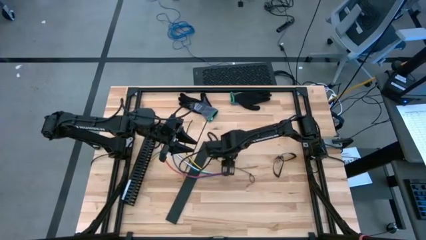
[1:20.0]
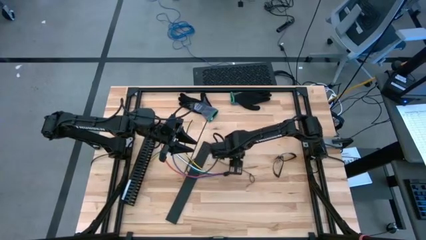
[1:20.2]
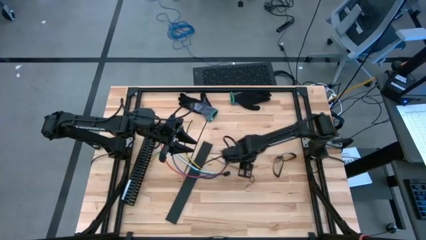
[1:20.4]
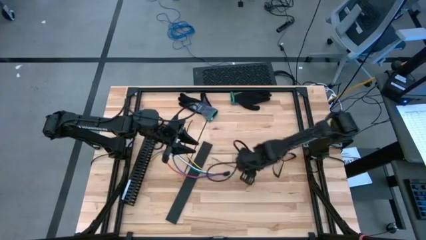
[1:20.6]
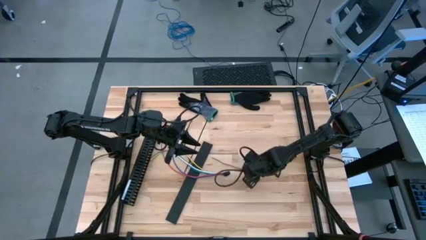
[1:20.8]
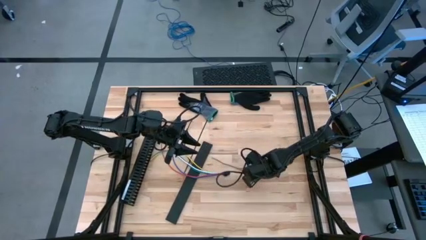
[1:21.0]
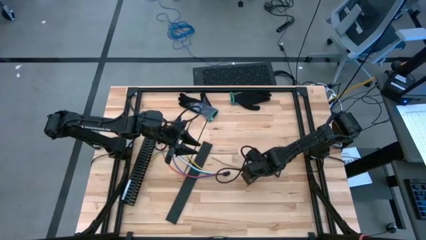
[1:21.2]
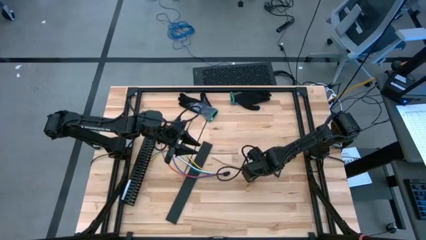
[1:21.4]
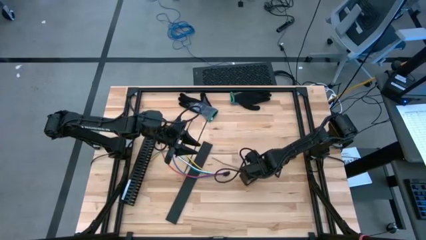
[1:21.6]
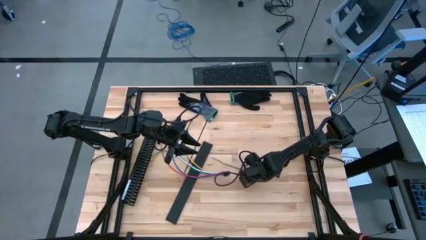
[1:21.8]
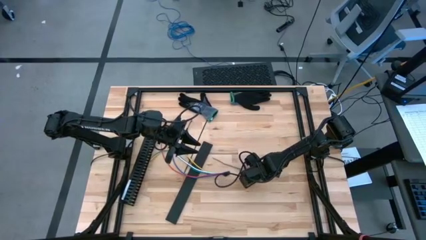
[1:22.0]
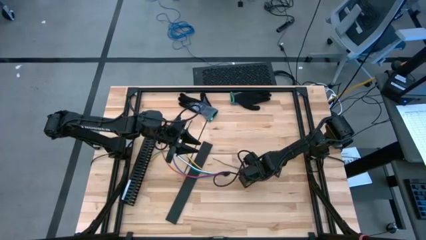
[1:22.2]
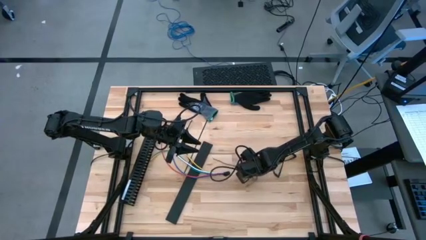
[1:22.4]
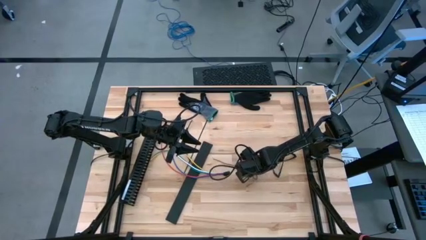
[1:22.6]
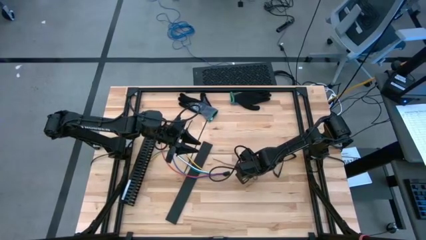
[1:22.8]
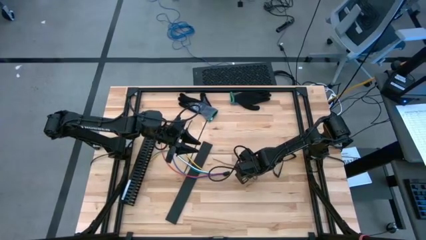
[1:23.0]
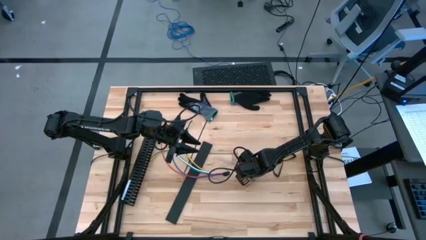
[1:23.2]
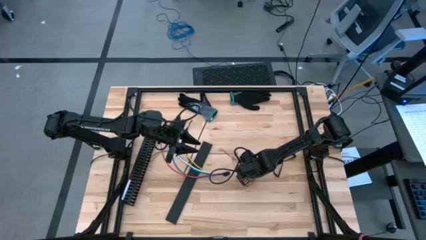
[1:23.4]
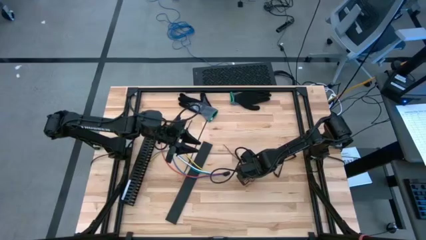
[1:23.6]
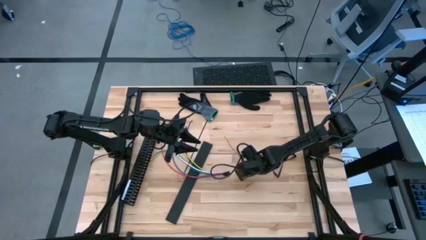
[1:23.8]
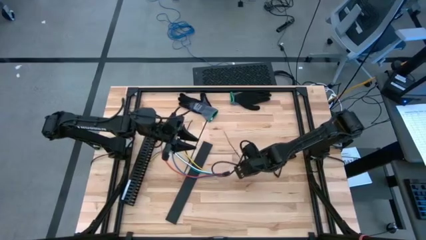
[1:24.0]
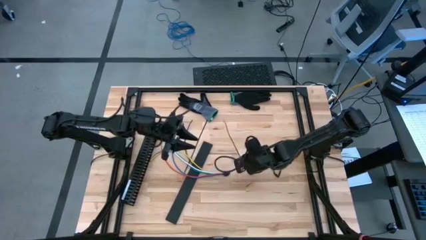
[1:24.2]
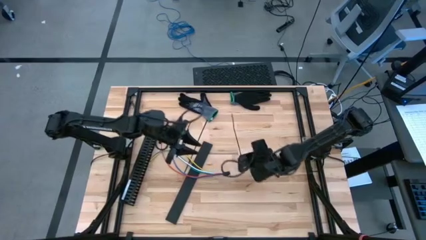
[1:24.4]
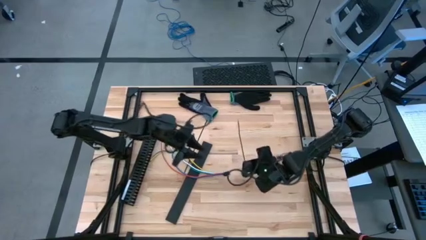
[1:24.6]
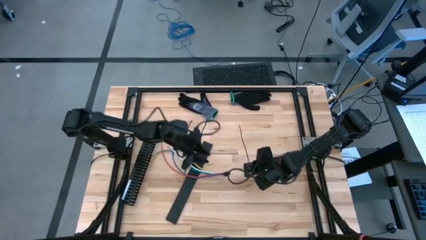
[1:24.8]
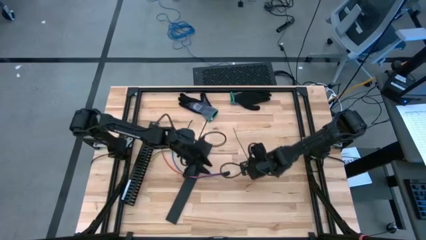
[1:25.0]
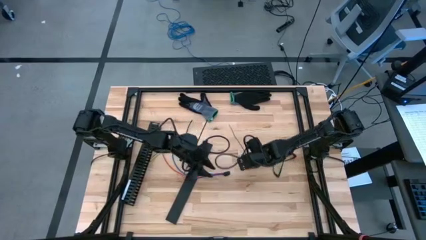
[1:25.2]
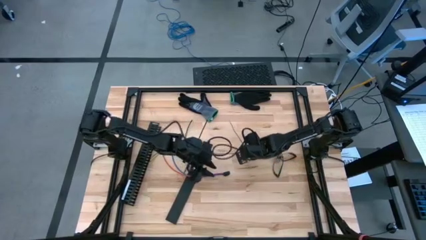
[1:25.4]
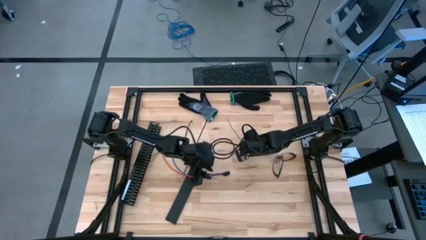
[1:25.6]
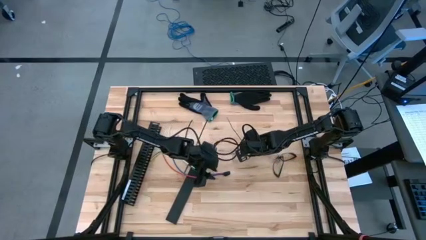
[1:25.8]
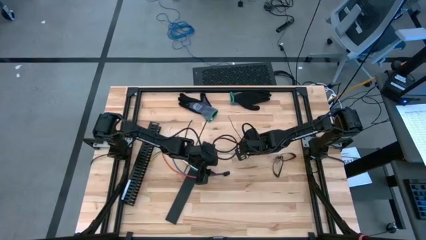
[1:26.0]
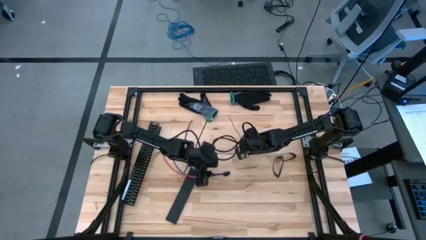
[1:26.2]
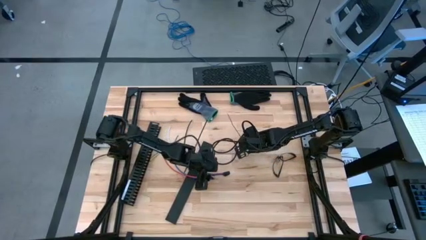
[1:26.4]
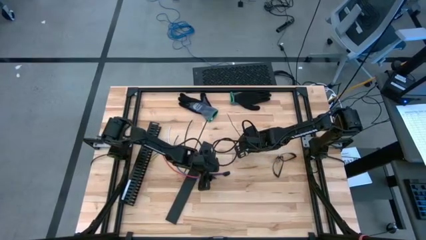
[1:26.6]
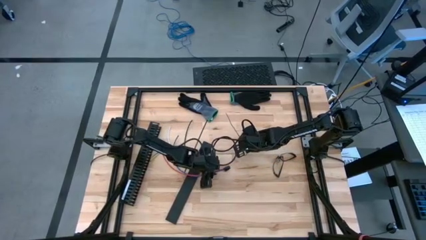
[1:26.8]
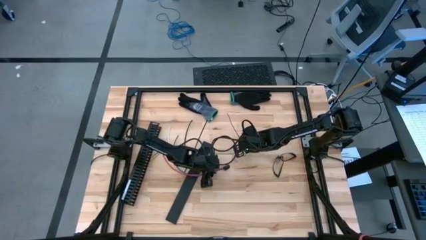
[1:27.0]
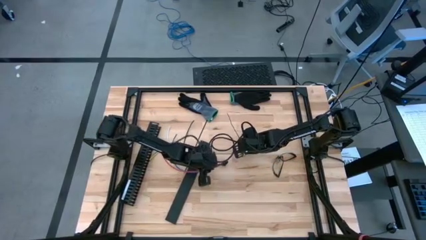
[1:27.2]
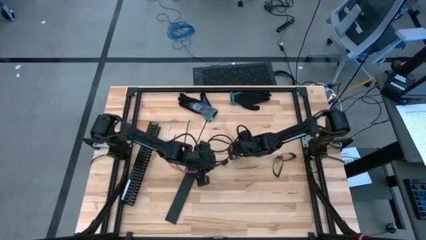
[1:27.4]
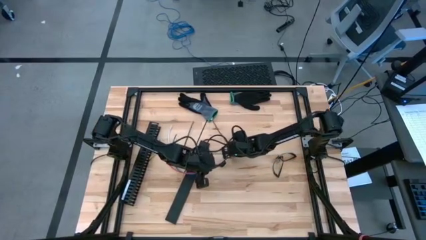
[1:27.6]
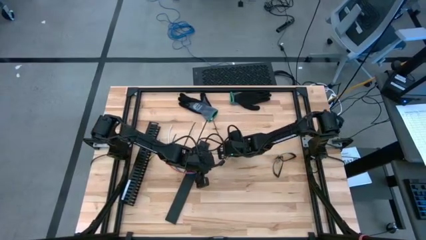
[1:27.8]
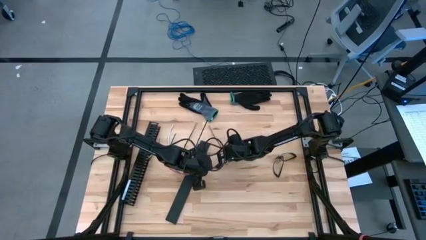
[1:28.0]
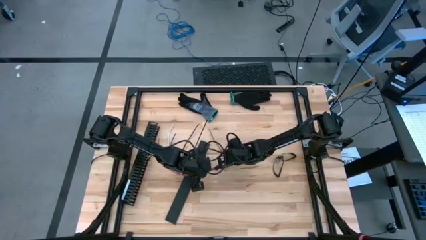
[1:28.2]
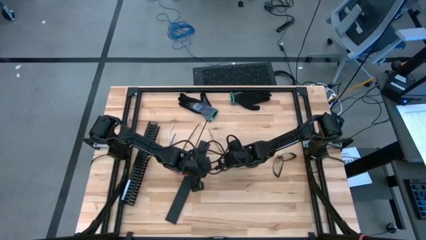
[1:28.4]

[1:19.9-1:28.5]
Task: Ziptie cables
Adjust the black zip tie

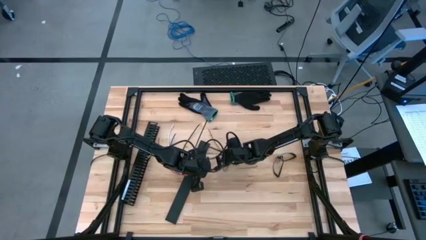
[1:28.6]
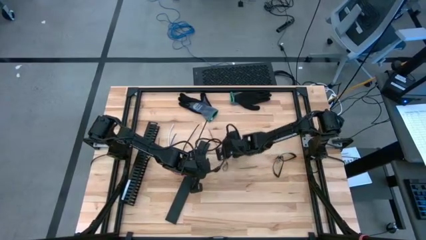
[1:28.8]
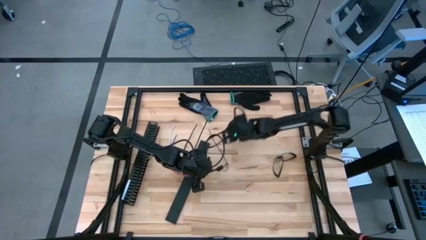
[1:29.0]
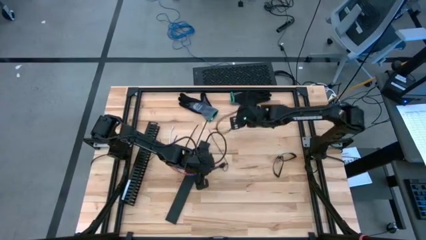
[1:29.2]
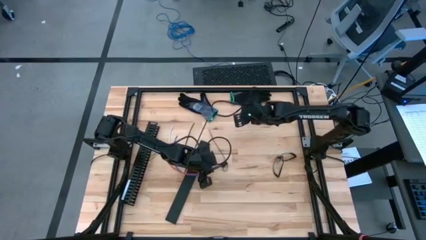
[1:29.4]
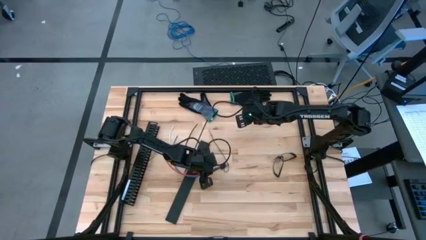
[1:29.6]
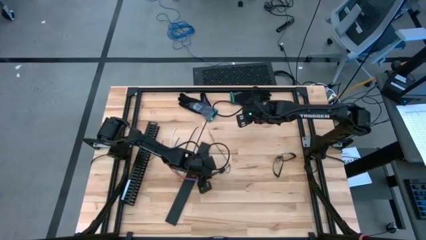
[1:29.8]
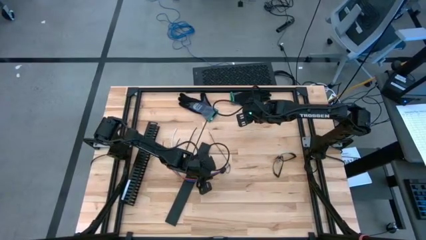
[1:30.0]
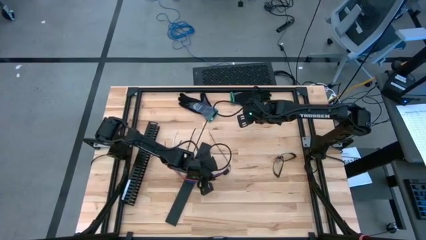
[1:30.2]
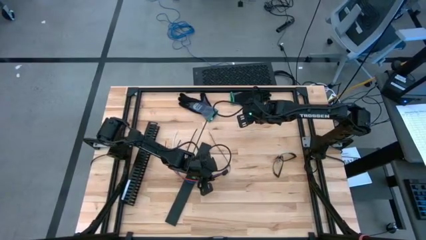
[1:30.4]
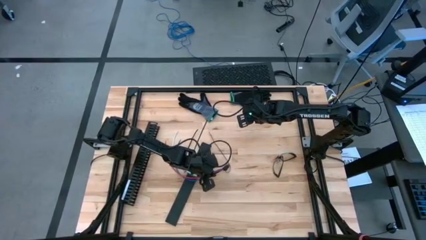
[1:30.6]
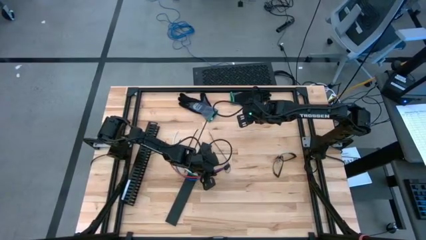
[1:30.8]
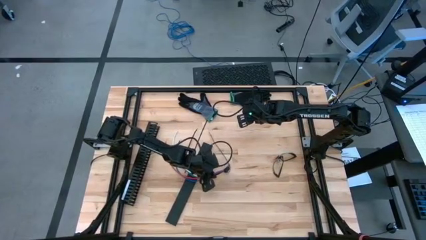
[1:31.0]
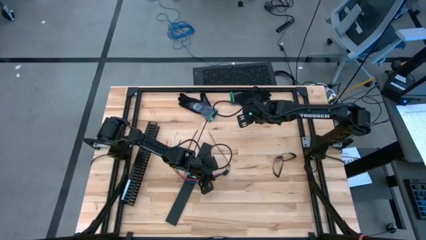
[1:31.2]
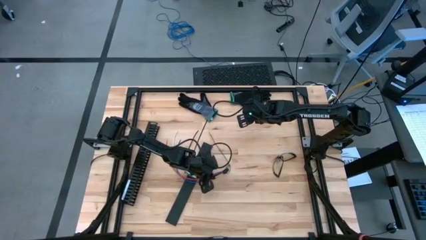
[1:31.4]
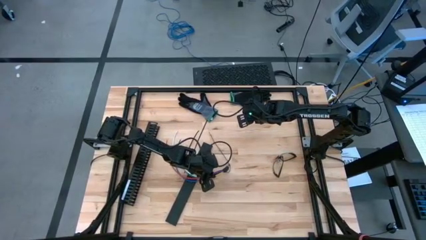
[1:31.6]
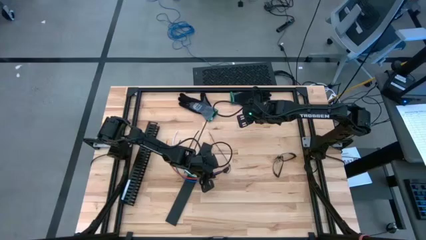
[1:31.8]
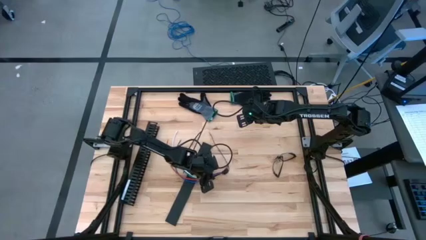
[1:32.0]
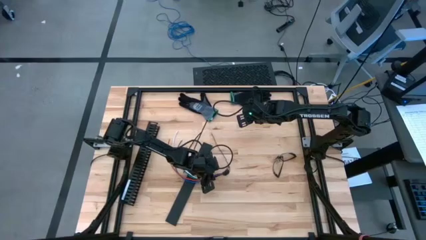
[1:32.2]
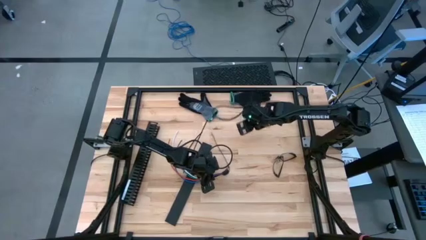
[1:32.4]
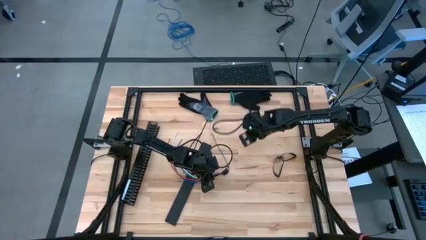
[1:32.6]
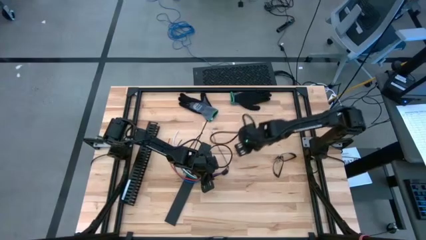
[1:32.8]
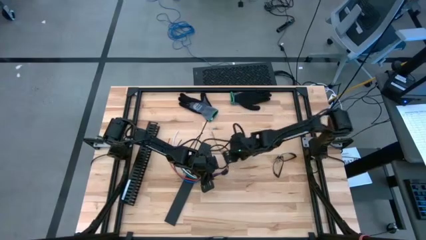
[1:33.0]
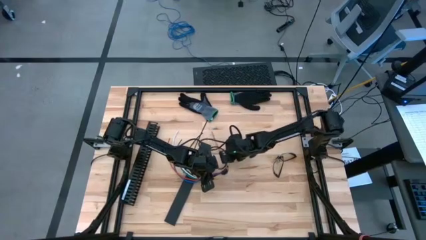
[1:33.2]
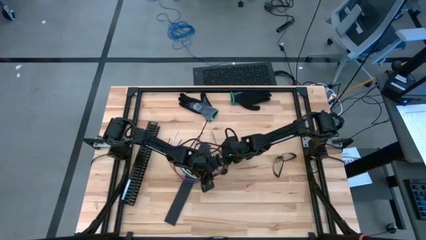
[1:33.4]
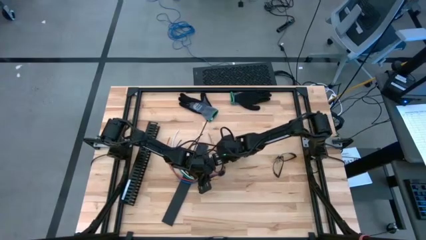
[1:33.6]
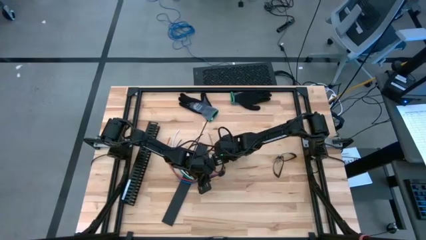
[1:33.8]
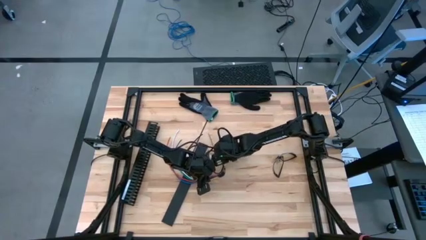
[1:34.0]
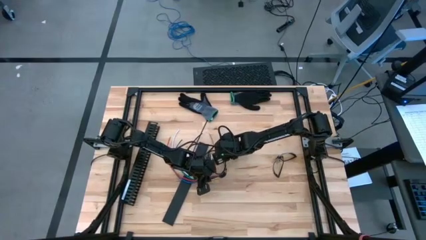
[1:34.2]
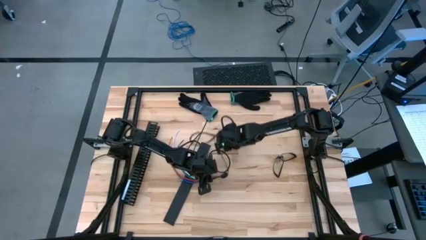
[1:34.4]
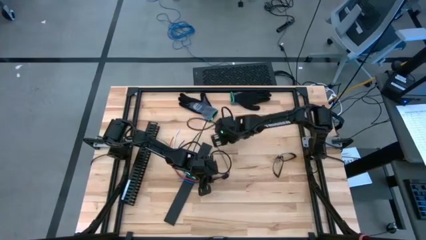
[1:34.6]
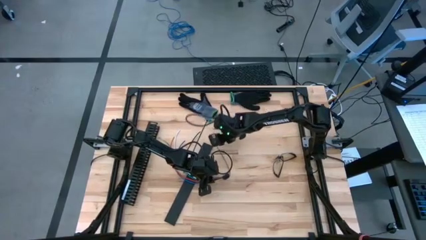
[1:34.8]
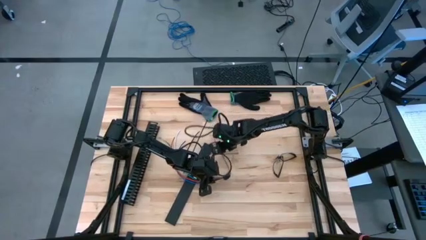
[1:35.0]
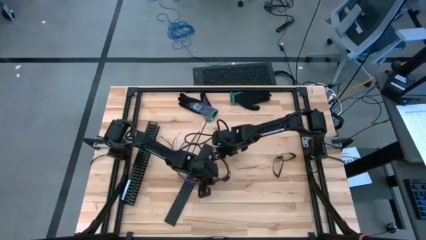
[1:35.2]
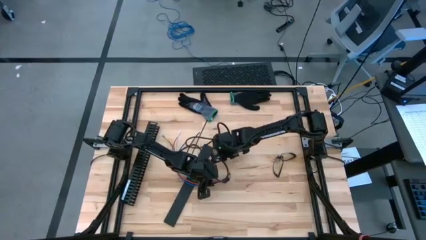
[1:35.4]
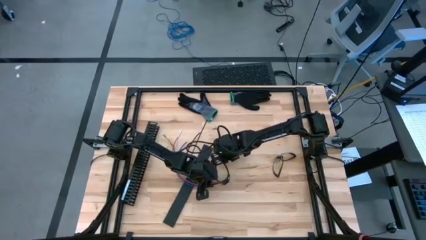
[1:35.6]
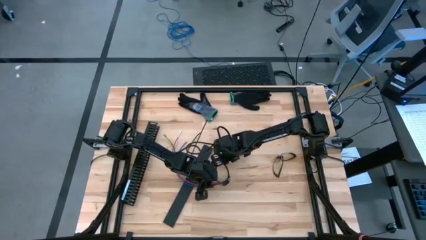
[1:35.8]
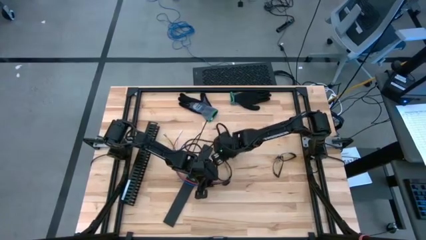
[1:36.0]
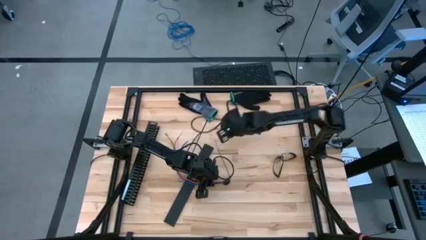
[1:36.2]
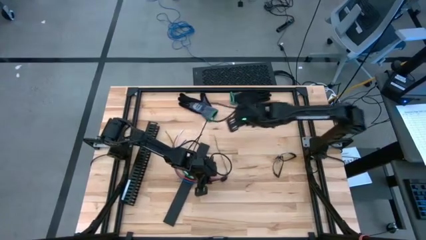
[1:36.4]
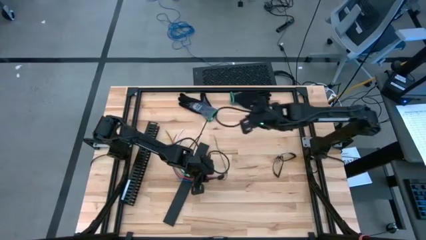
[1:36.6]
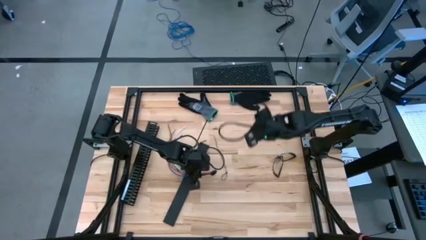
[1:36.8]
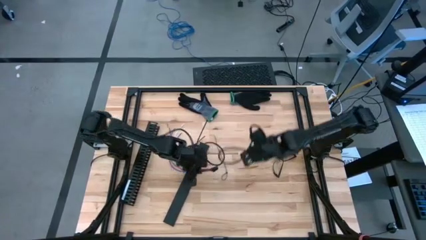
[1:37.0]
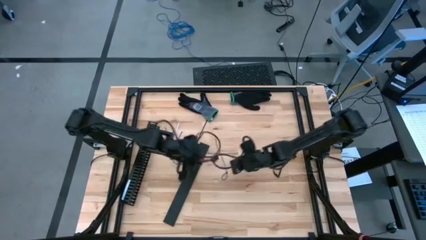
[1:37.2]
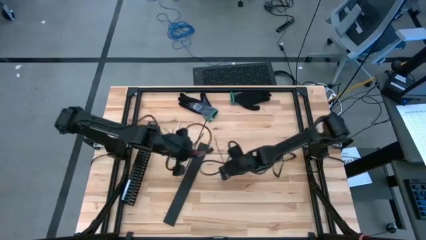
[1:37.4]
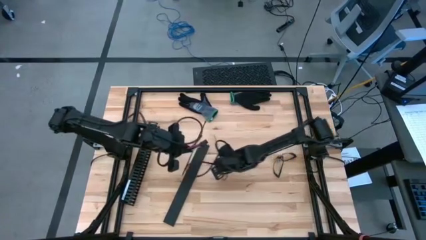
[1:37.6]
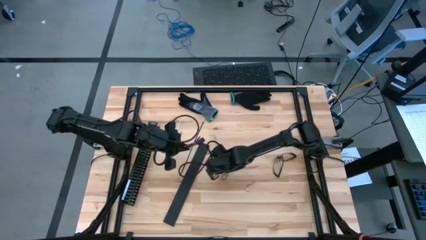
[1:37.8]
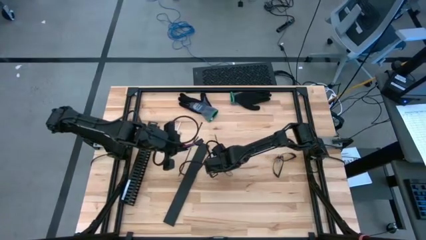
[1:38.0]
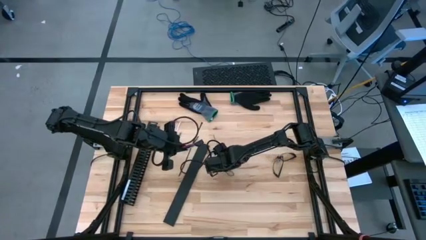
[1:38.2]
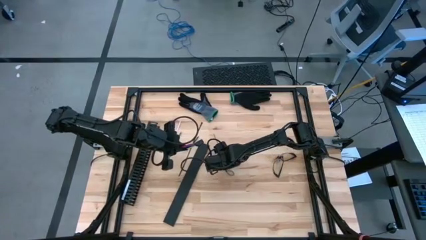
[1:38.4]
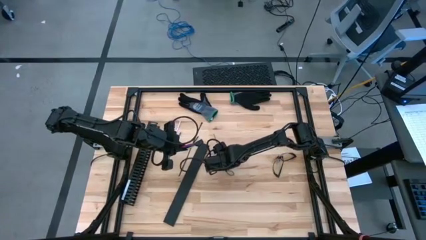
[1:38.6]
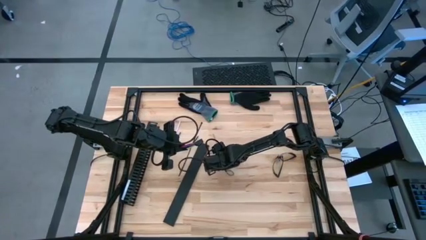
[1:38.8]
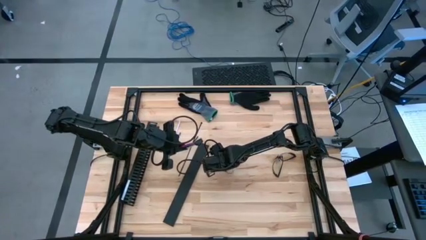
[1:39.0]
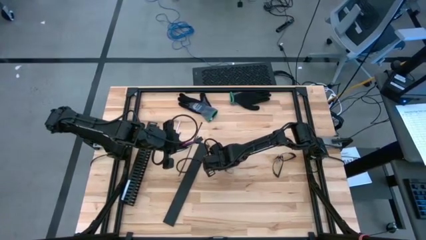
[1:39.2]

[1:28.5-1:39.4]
Insert the cable wire into the black zip tie
